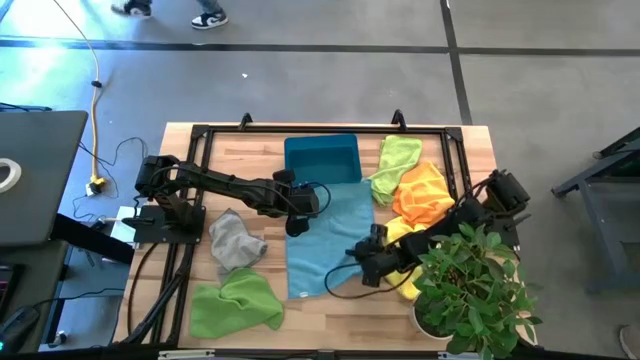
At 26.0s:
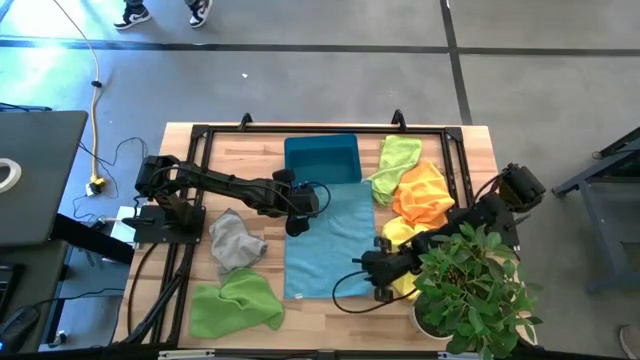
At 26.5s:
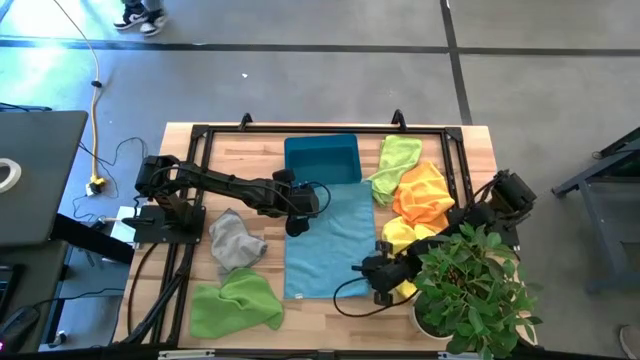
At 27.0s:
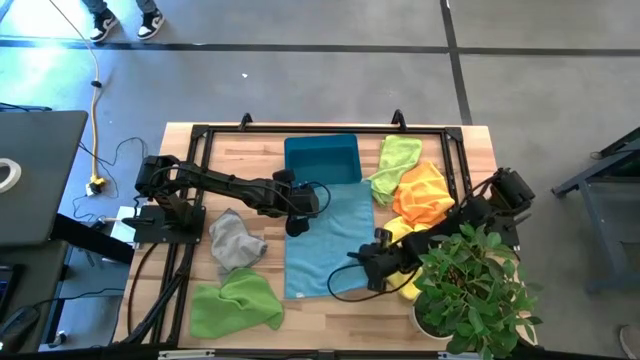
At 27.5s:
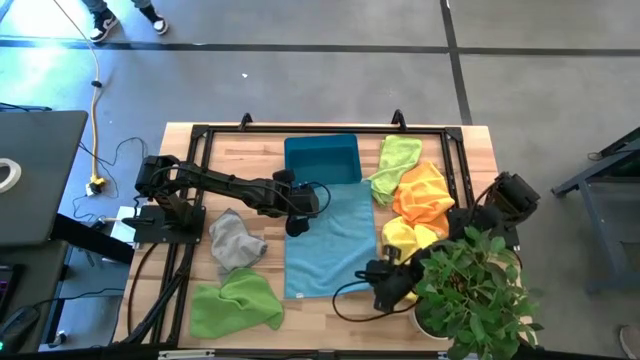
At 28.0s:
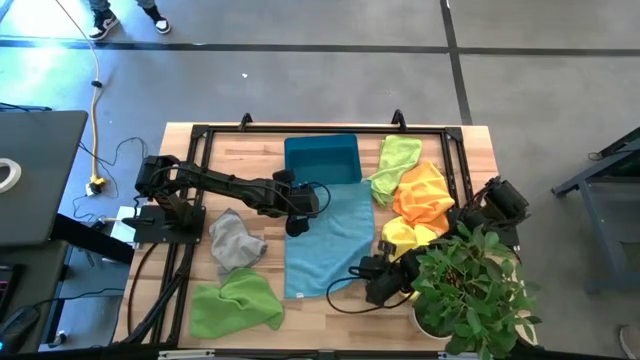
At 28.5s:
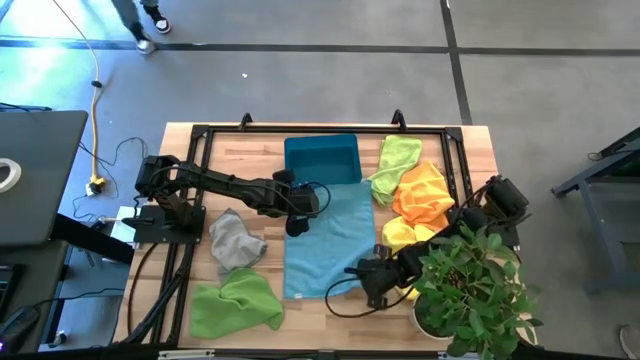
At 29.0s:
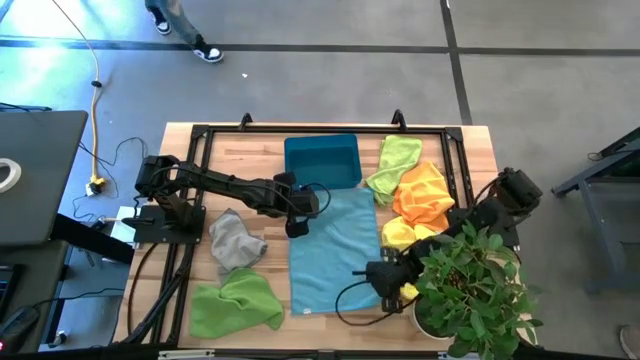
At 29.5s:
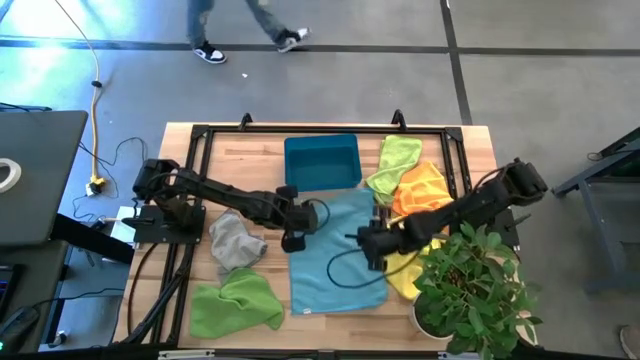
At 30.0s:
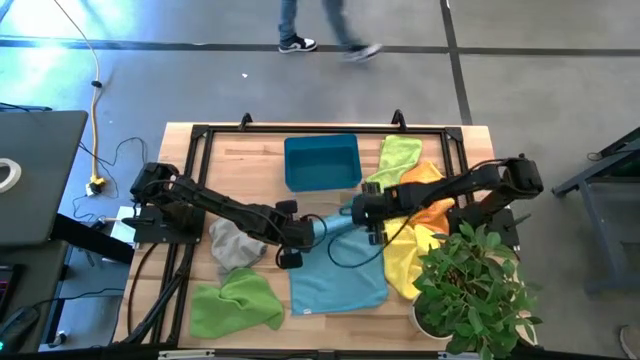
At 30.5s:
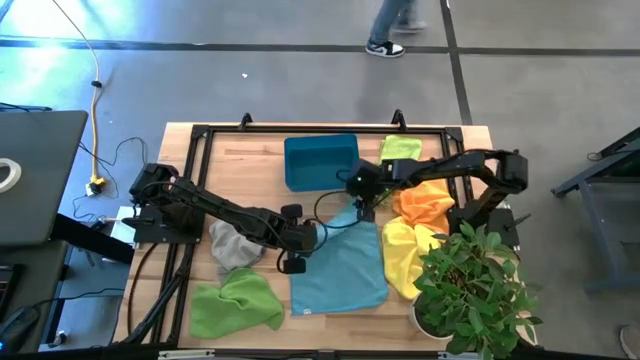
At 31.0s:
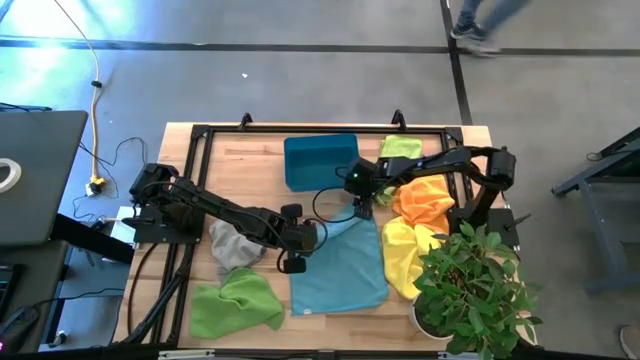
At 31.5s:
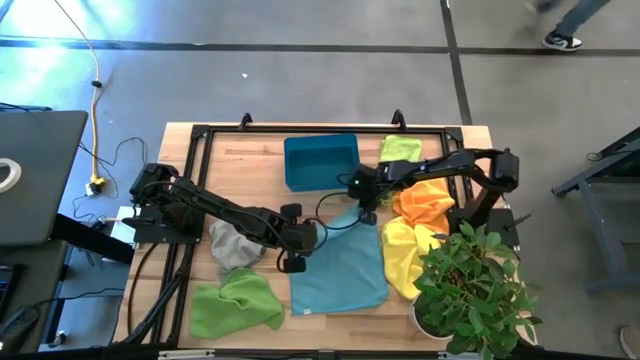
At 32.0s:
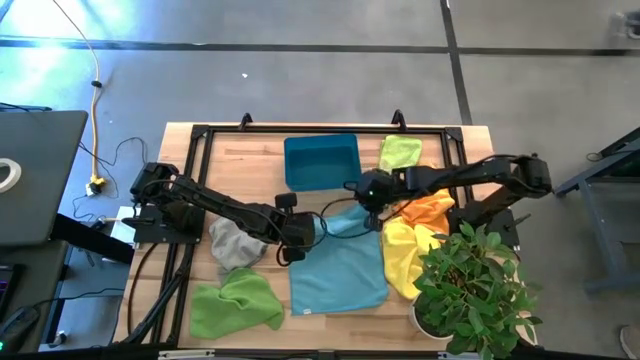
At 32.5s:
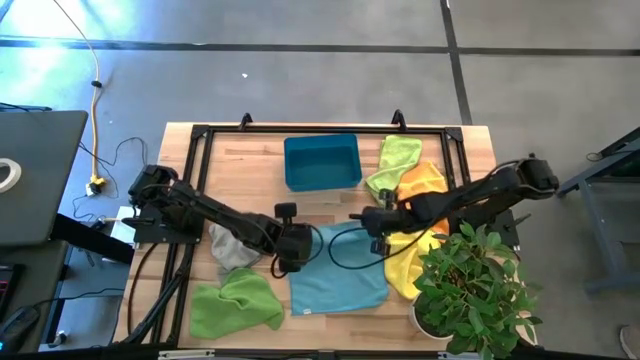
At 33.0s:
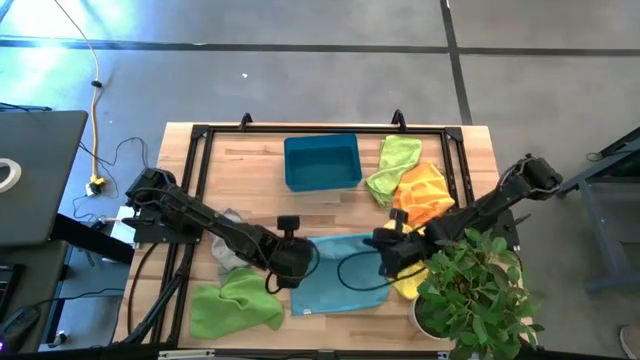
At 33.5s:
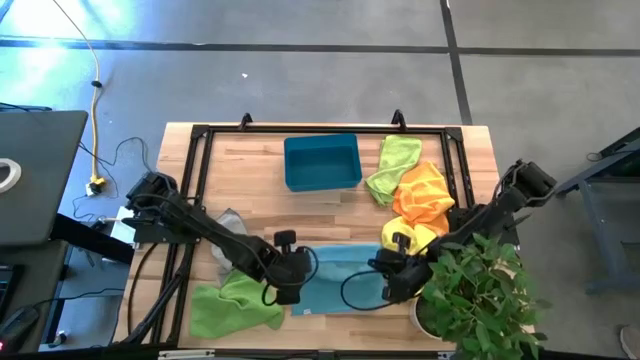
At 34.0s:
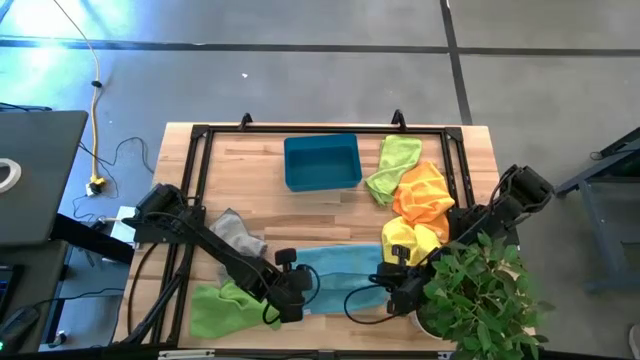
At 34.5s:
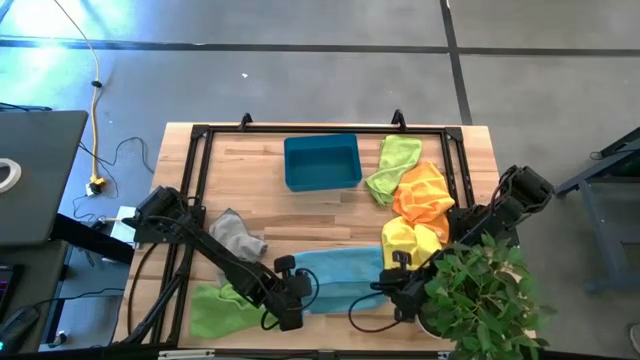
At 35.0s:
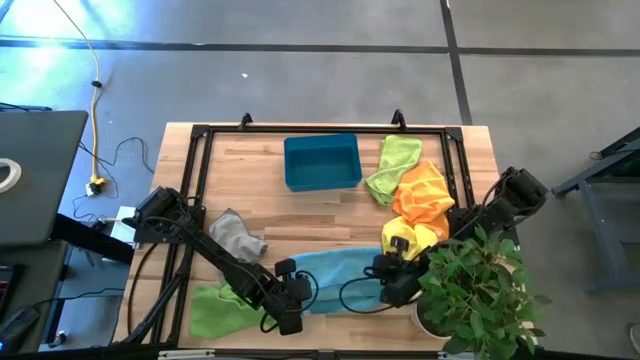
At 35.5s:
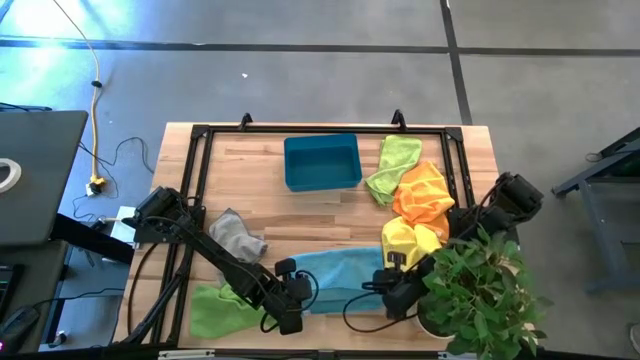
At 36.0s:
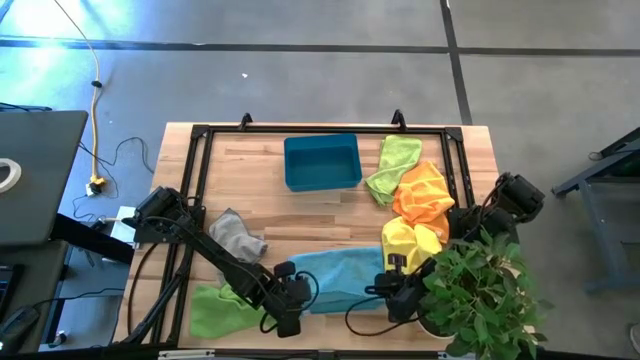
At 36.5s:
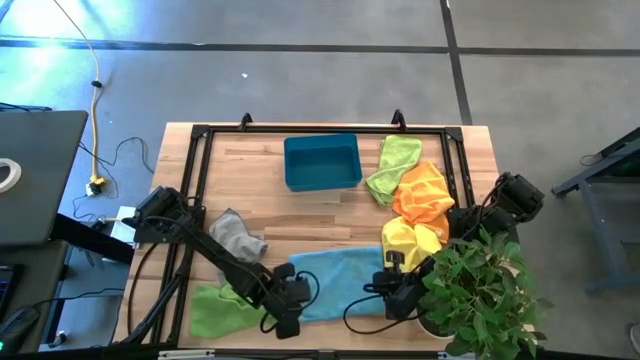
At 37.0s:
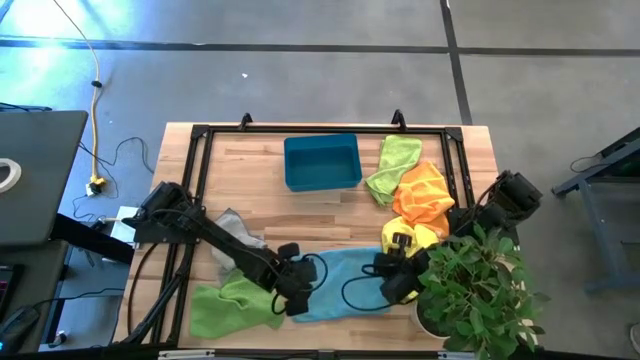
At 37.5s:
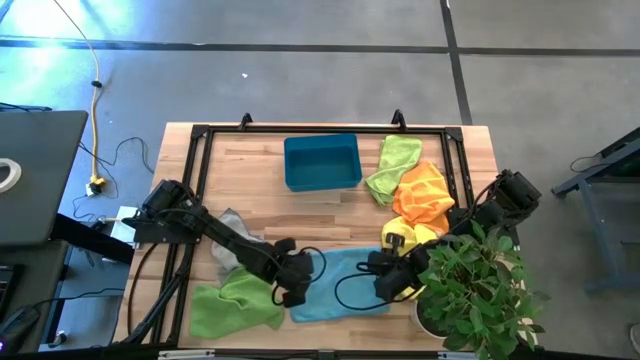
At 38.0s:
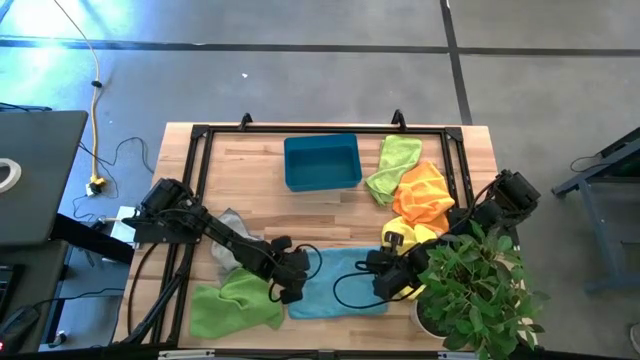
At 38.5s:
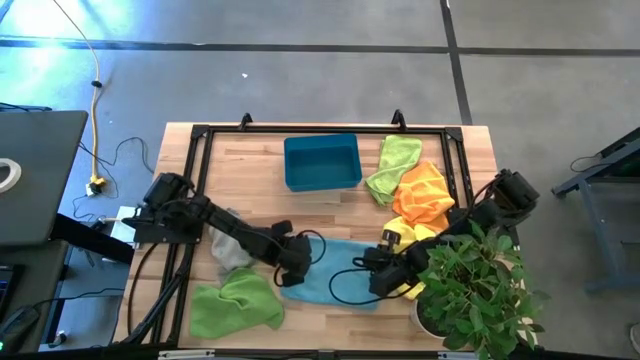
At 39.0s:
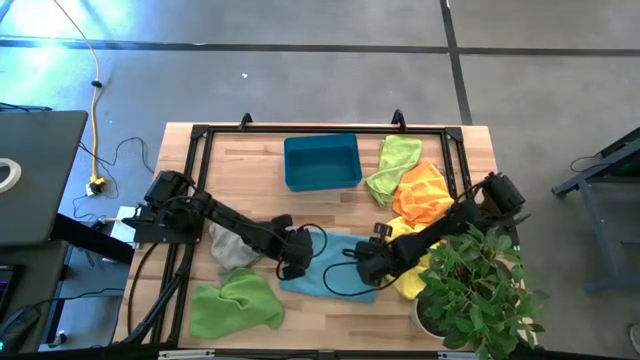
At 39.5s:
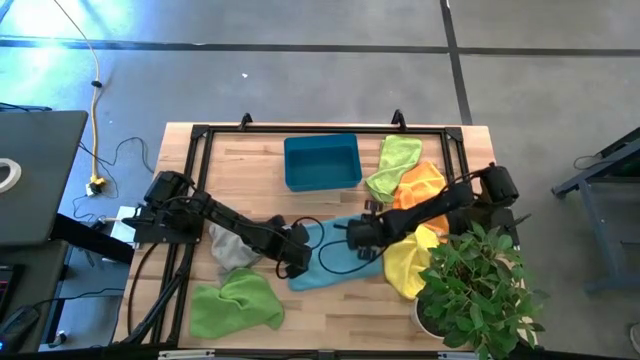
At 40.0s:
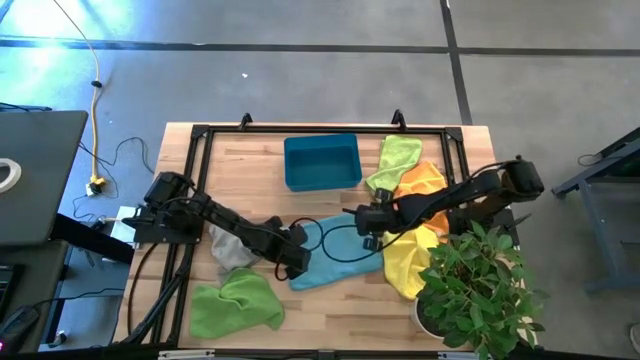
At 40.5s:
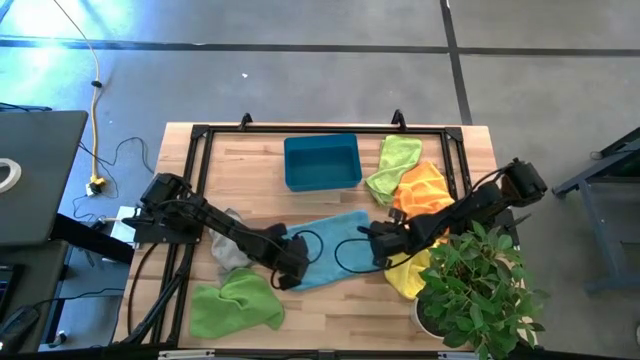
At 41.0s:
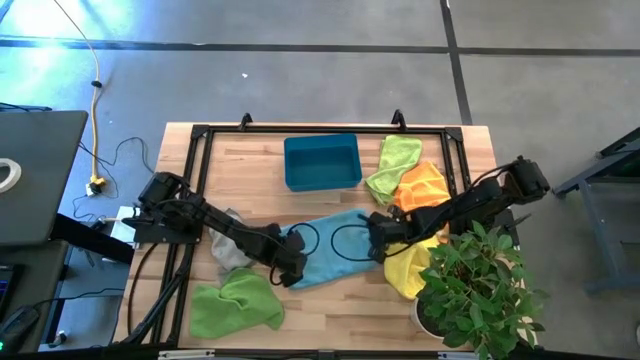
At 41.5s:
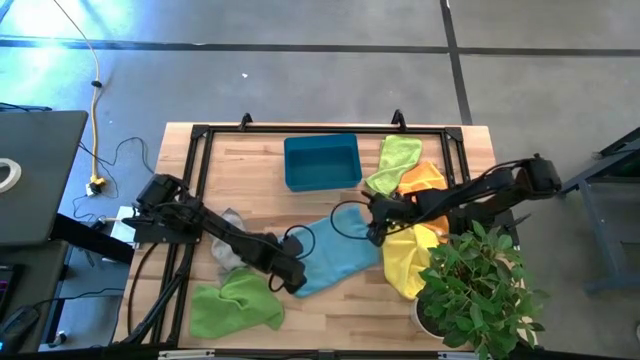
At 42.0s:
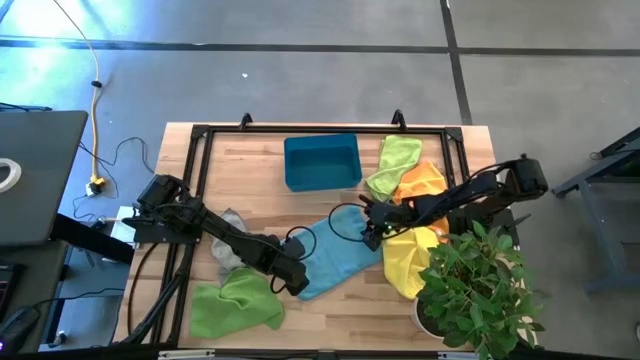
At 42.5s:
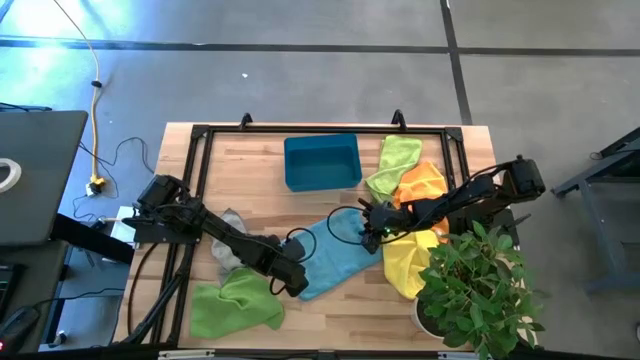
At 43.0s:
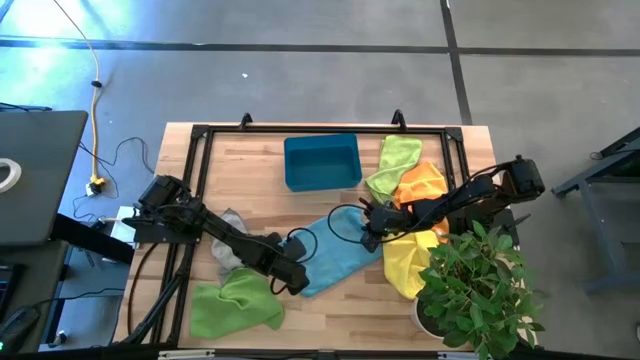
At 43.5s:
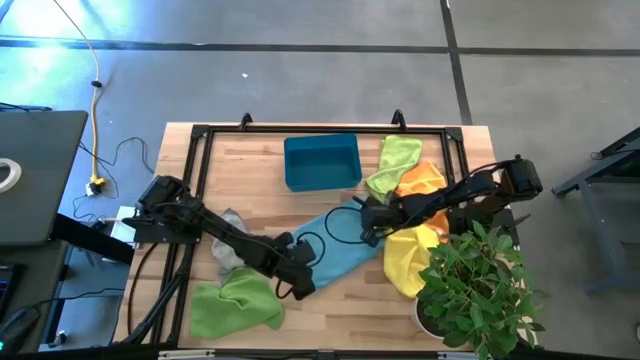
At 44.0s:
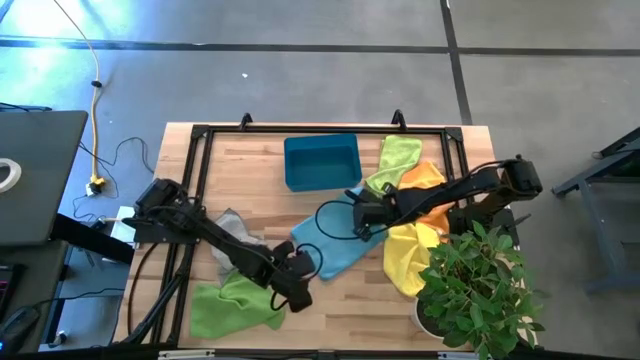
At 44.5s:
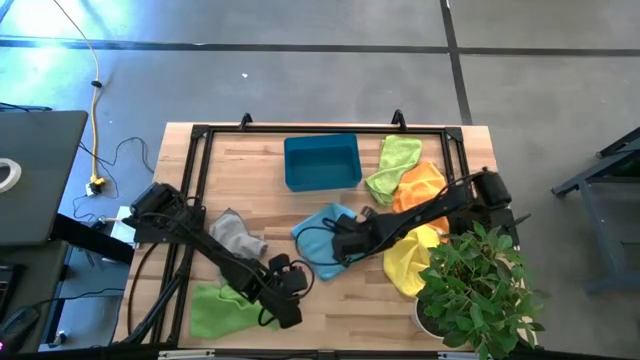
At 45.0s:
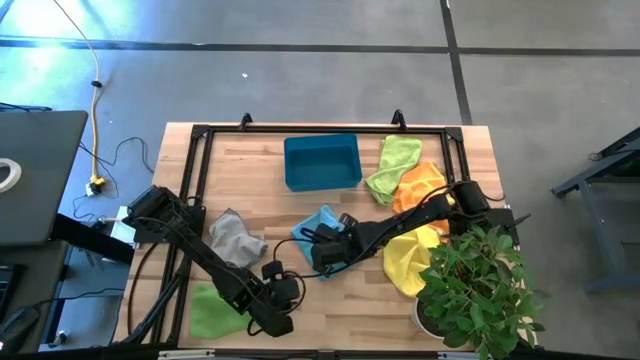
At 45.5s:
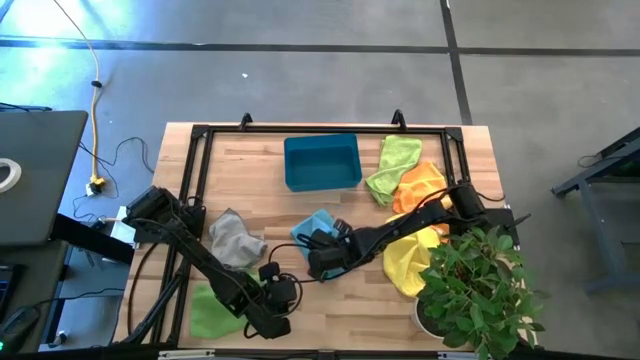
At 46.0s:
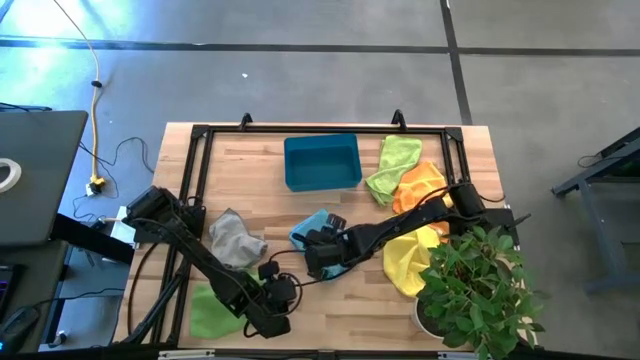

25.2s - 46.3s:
Task: Fold microfiber towels
Fold the blue microfiber cloth
